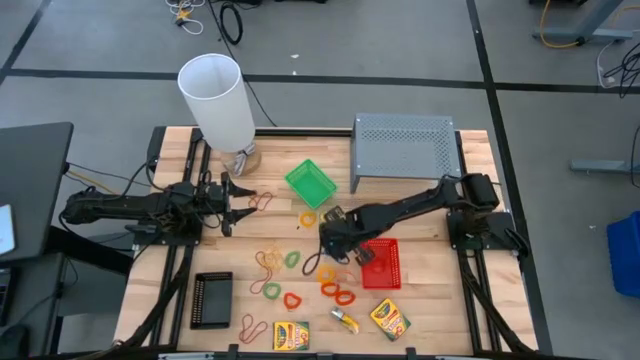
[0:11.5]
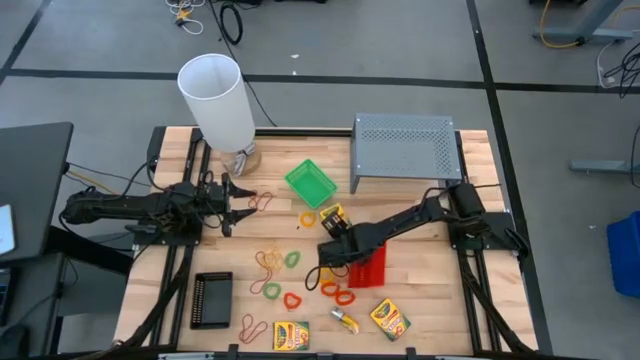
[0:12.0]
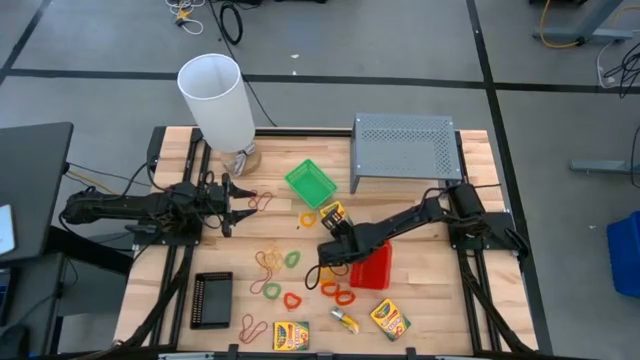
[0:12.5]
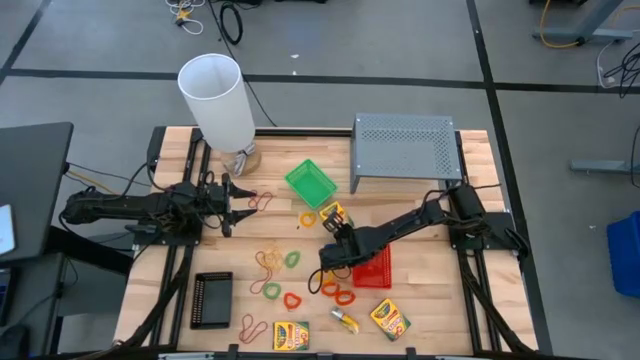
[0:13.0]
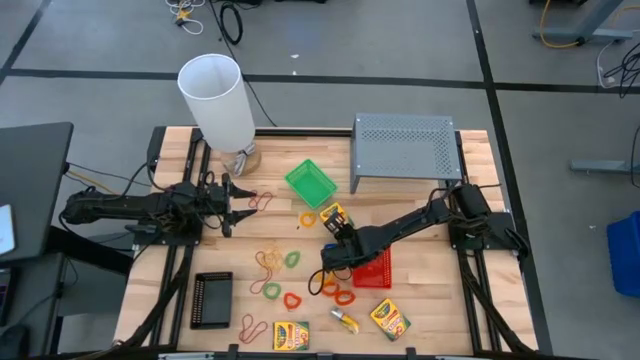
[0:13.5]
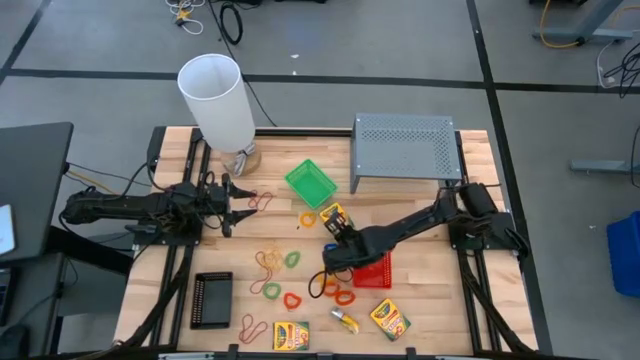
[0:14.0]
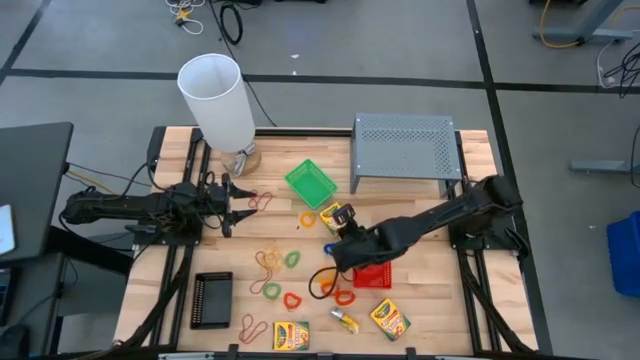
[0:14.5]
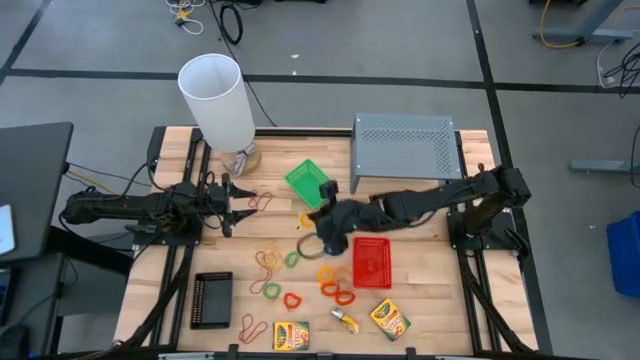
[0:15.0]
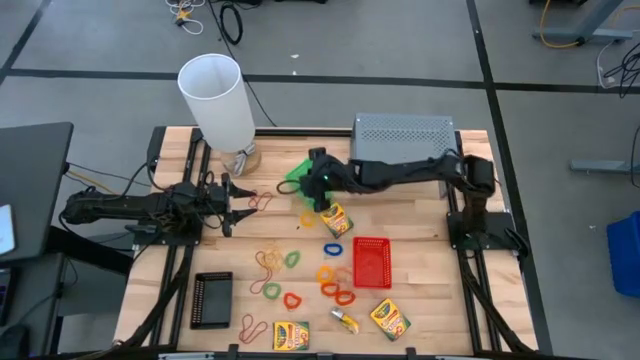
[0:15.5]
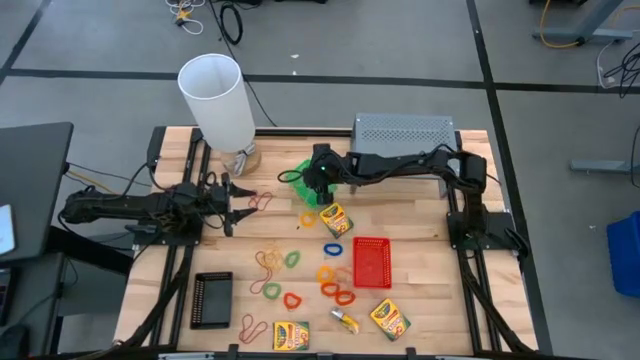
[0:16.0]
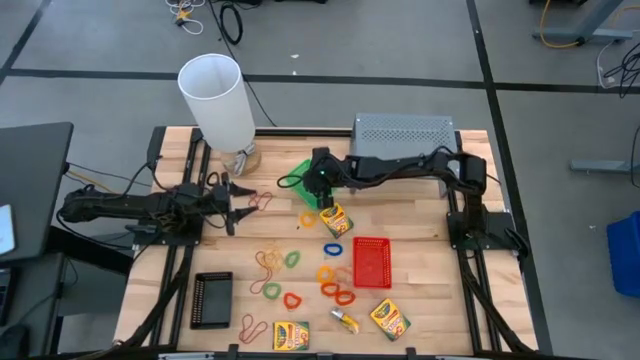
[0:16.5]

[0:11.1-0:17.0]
Task: Pick & Place Office Desk Supplies
Put the yellow rubber band into the green bin

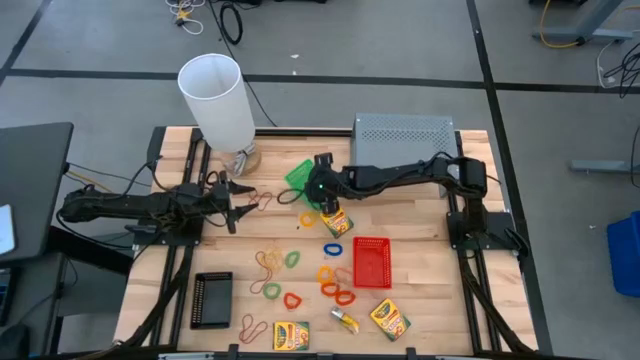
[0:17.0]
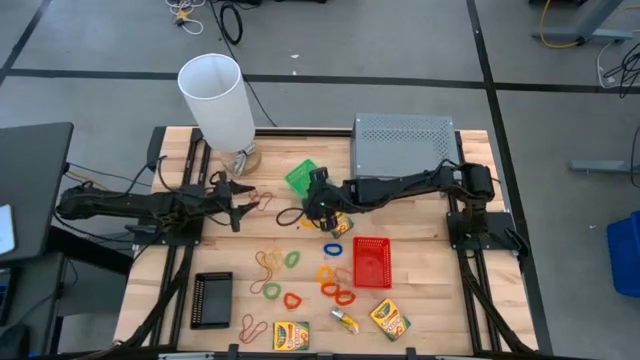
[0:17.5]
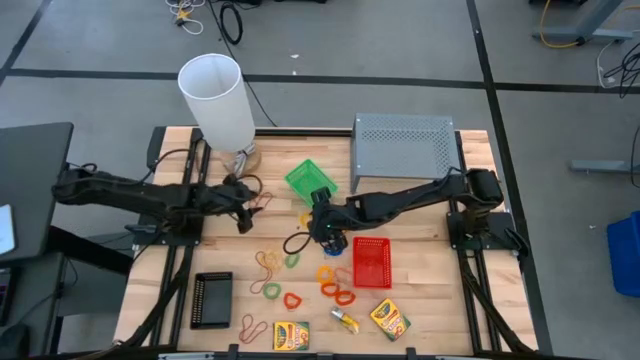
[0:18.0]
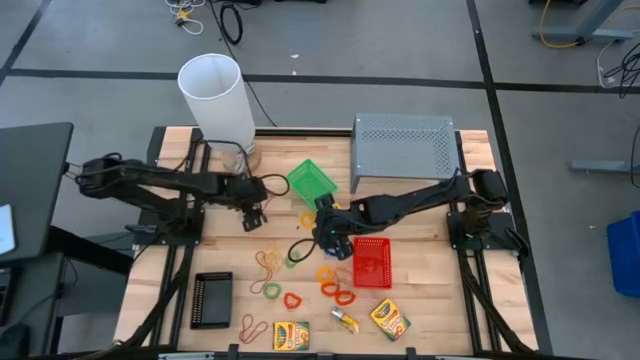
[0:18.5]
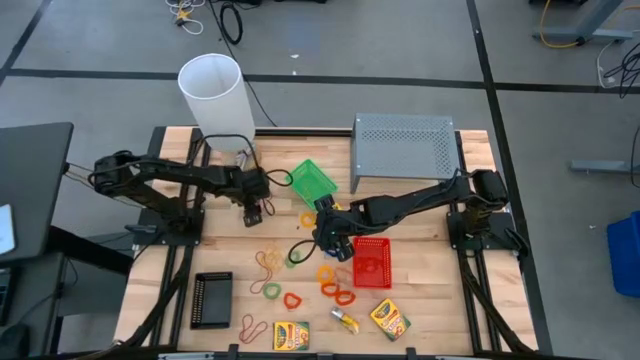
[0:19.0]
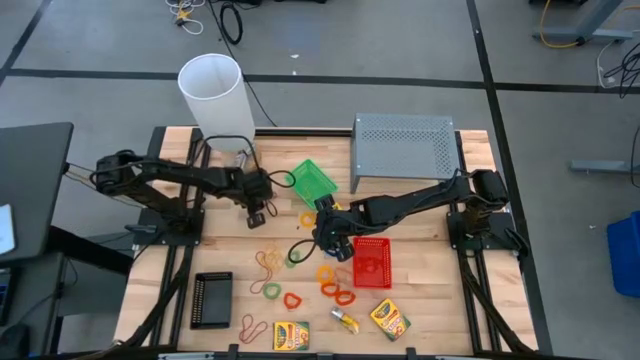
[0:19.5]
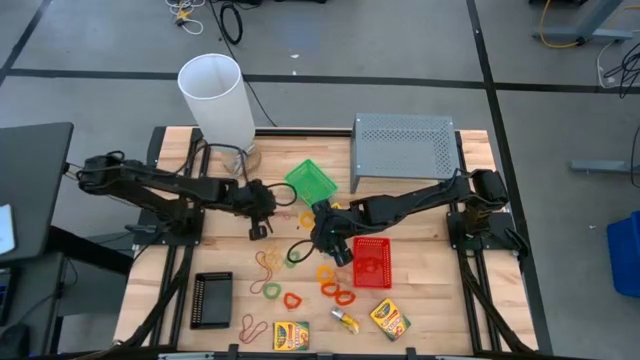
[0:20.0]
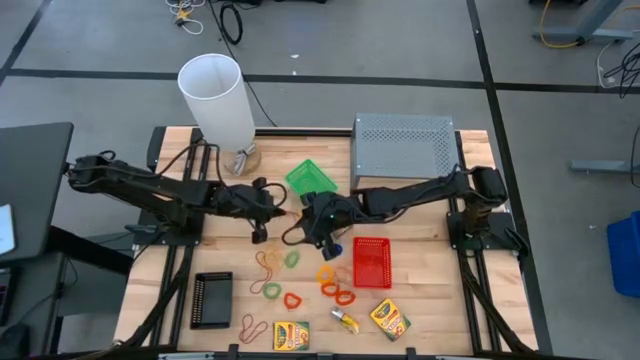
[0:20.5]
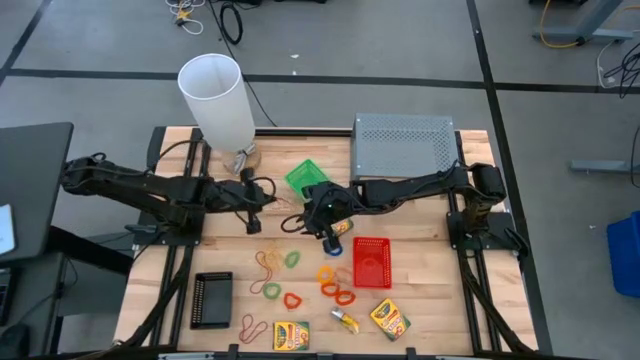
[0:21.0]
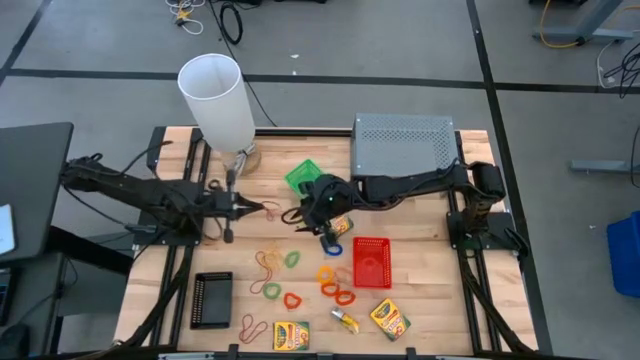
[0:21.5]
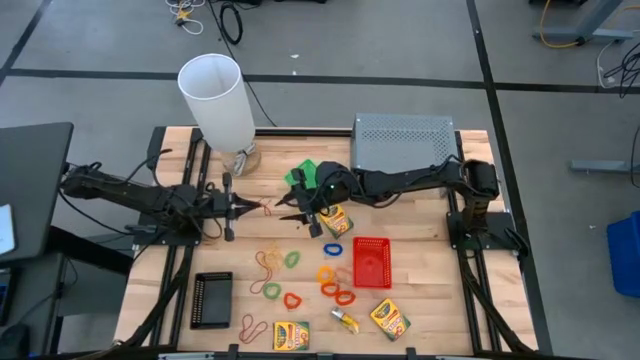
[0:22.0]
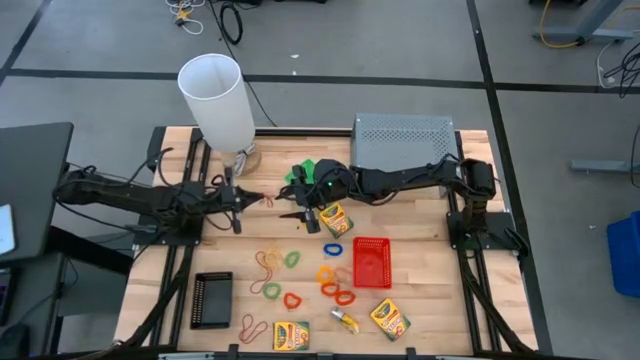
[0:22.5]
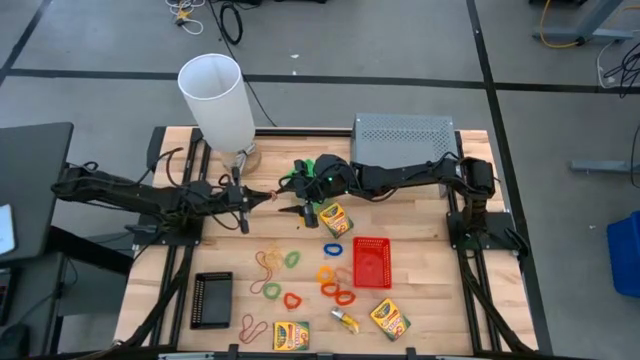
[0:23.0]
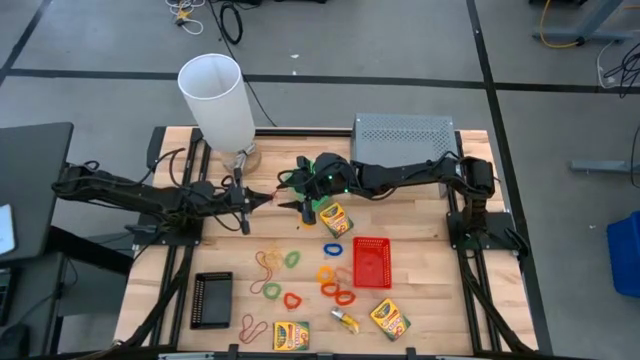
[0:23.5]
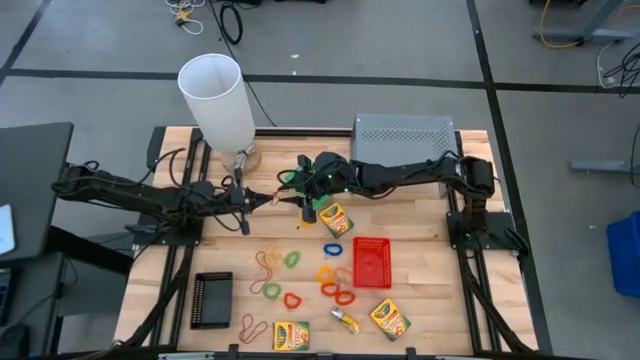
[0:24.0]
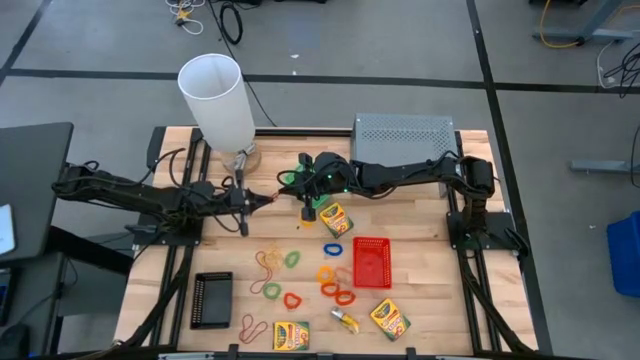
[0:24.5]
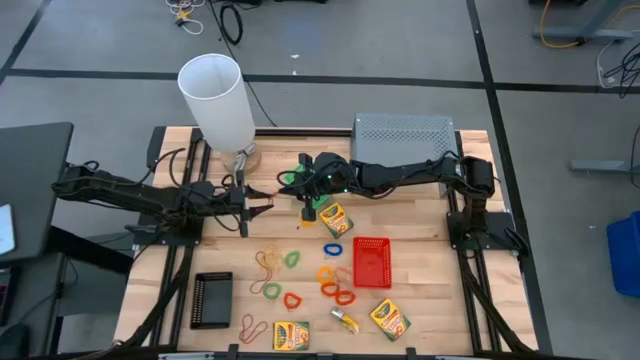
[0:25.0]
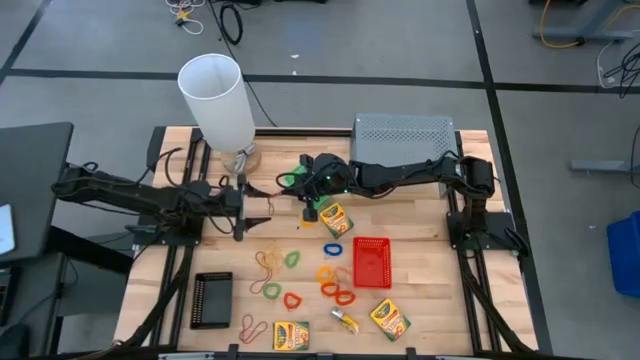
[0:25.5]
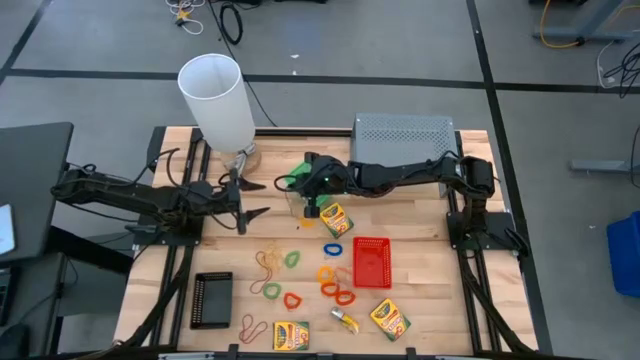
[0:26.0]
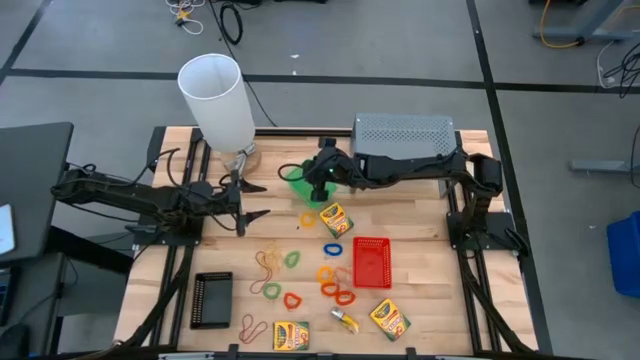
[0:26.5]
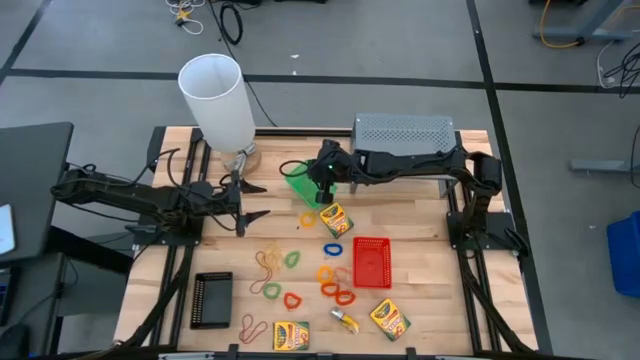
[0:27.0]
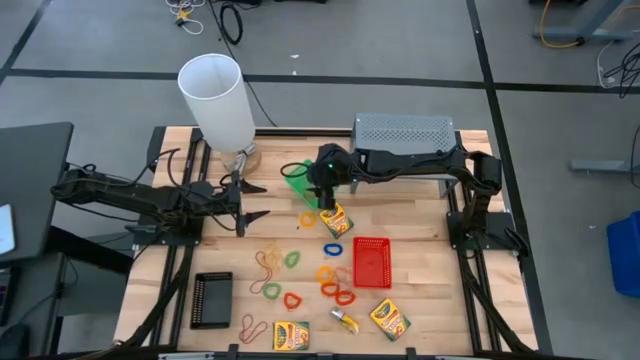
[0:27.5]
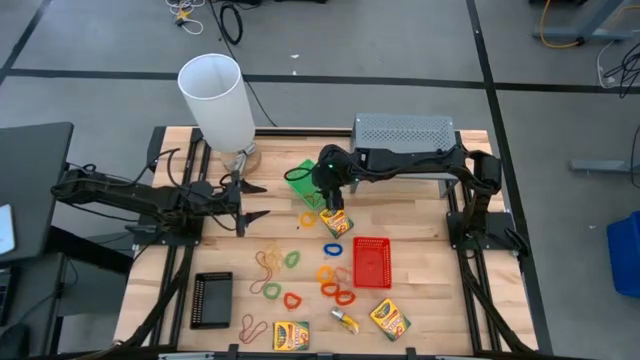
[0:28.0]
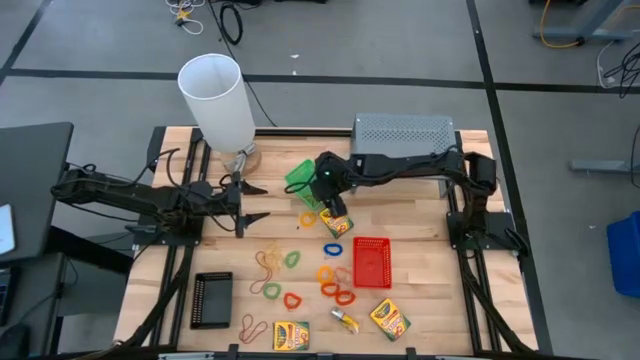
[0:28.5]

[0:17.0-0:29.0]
Put the red rubber band into the green bin

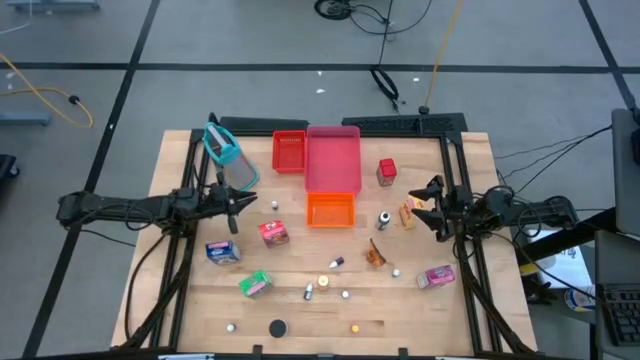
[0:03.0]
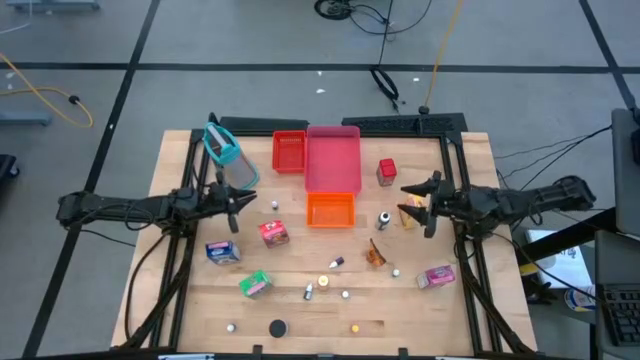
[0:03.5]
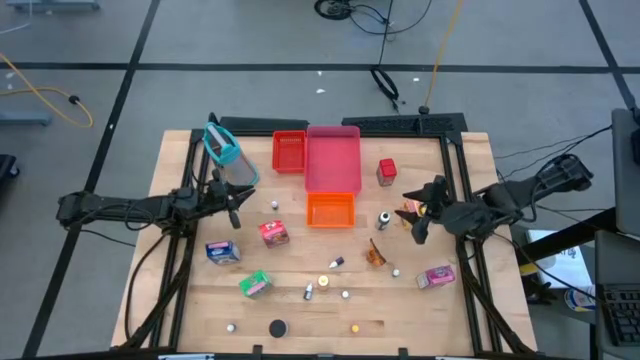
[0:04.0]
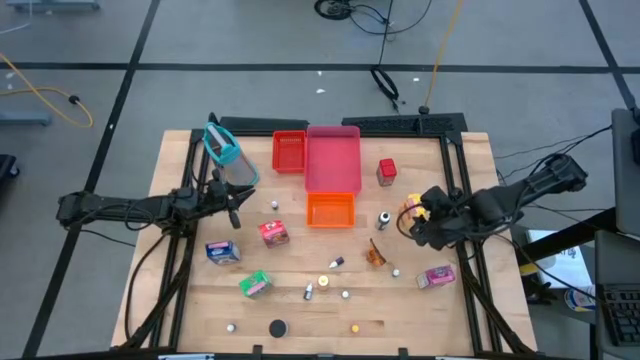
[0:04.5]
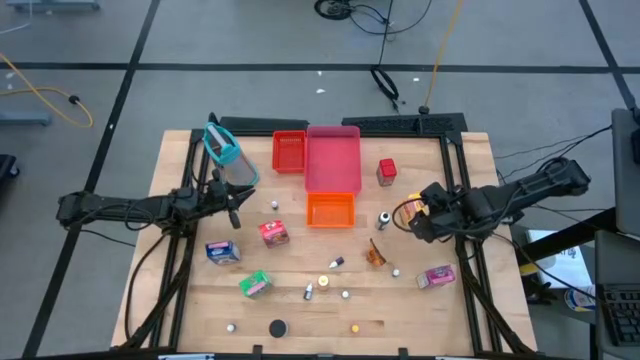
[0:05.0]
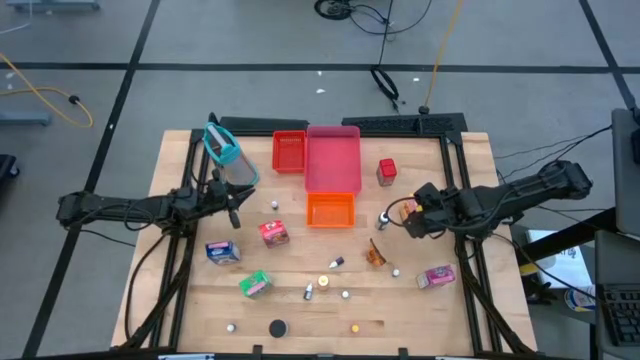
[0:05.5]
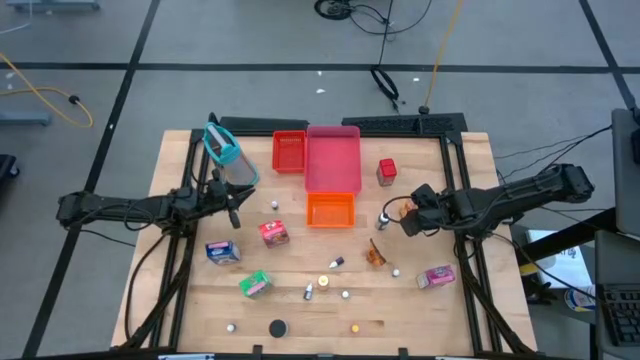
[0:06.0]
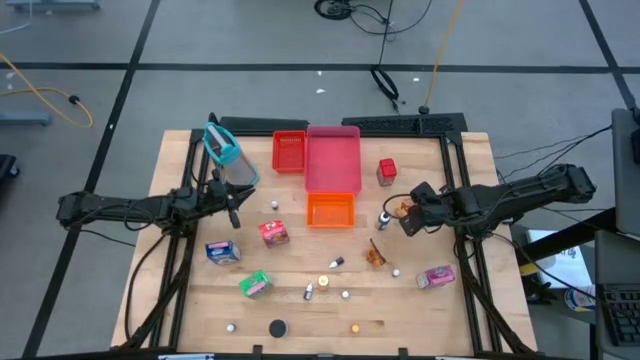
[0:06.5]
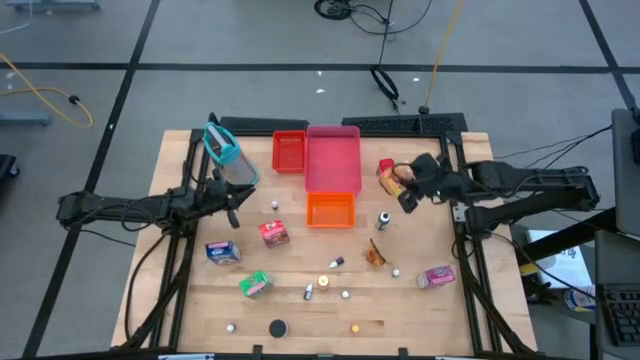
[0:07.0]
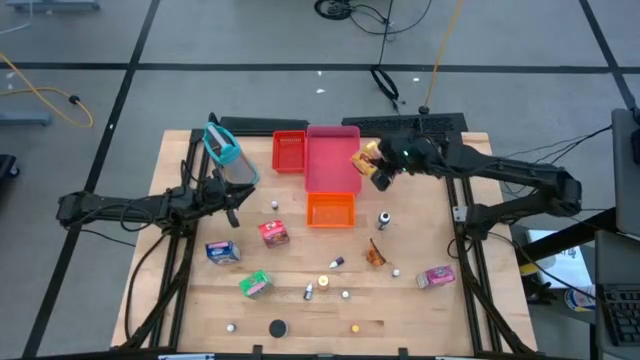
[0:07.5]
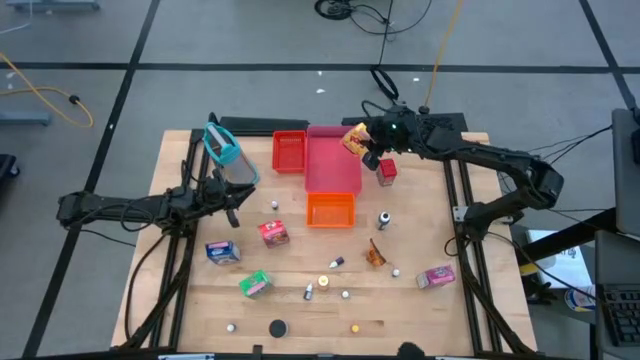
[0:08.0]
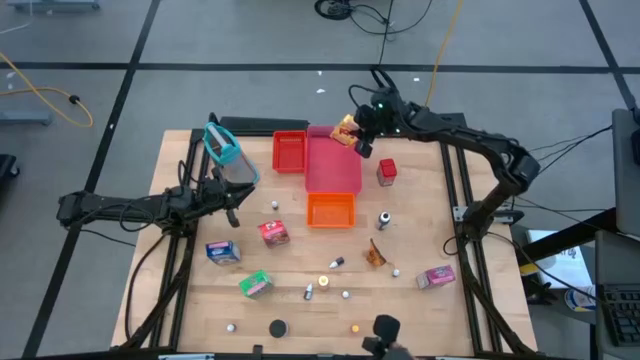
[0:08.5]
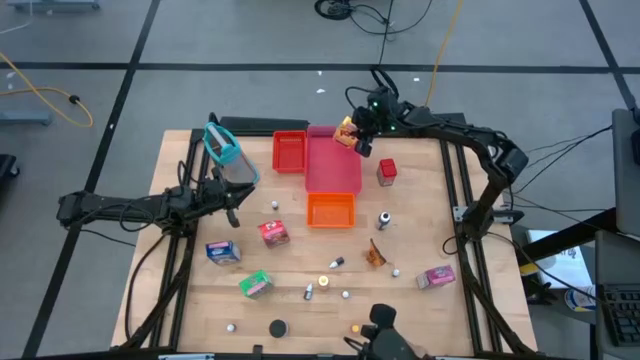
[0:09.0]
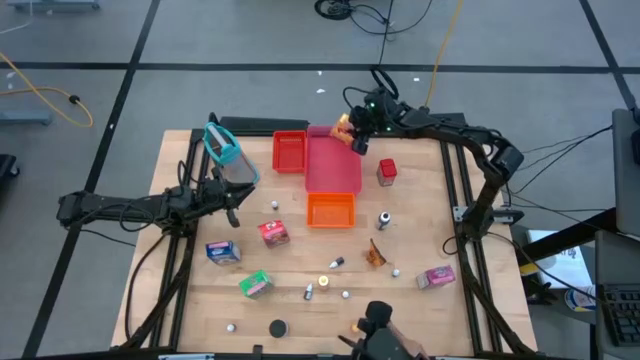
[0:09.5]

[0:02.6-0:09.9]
Task: Pick & Place Kitchen Items
Put the yellow cereal box into the pink bin
